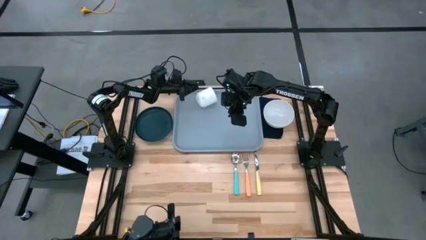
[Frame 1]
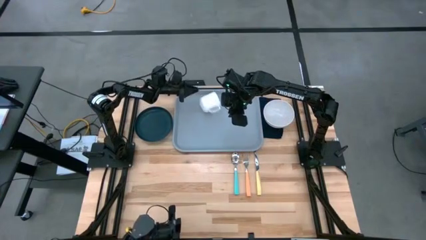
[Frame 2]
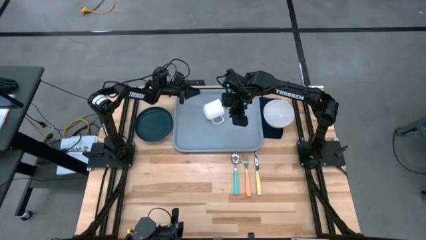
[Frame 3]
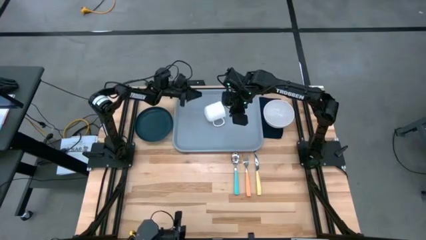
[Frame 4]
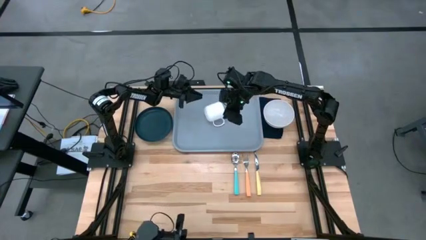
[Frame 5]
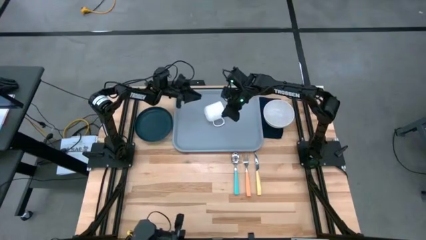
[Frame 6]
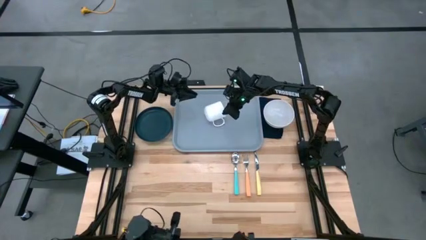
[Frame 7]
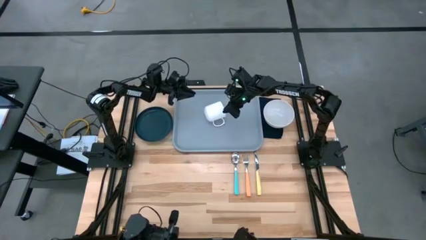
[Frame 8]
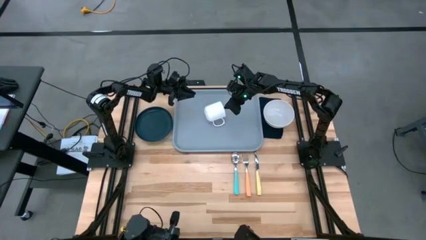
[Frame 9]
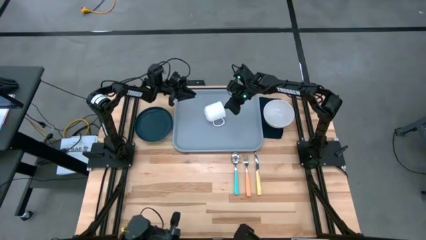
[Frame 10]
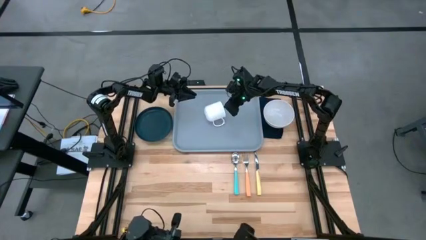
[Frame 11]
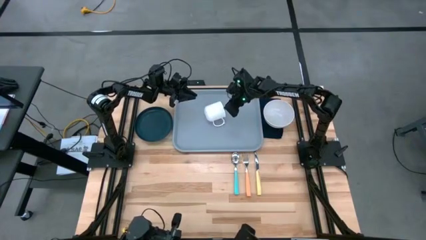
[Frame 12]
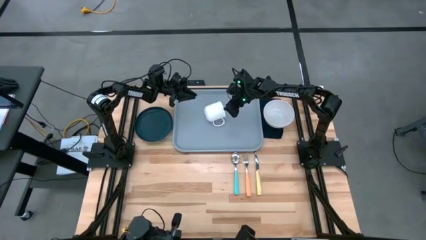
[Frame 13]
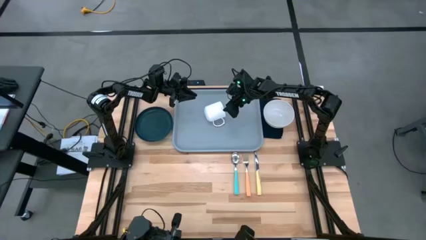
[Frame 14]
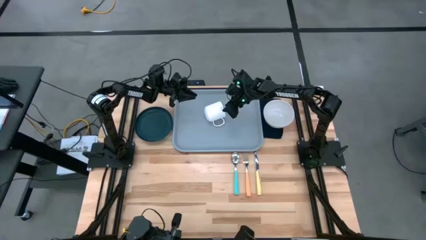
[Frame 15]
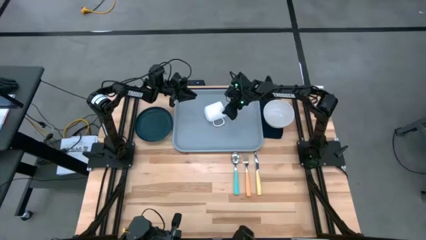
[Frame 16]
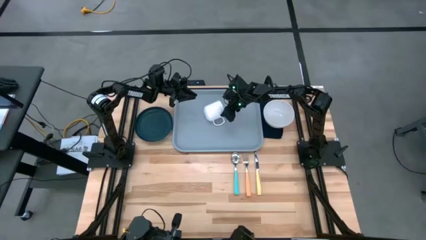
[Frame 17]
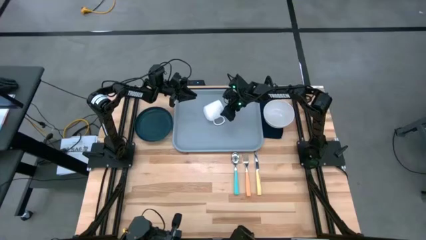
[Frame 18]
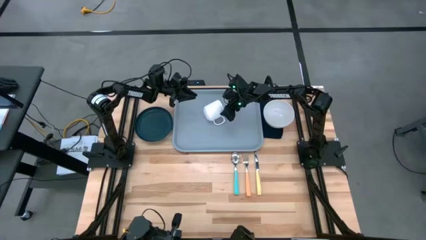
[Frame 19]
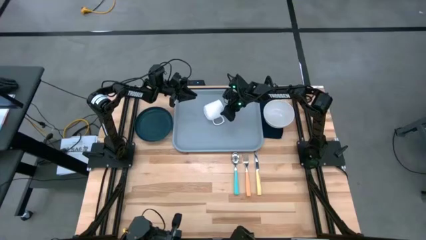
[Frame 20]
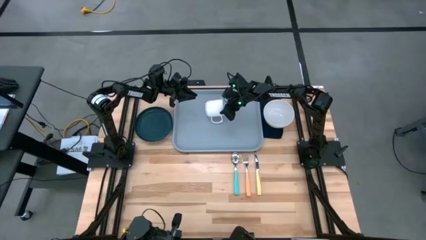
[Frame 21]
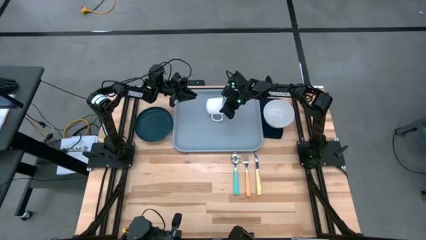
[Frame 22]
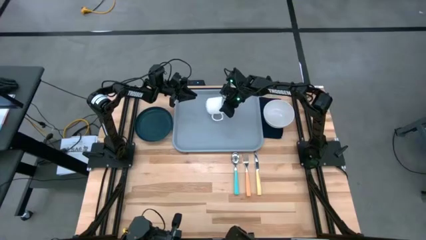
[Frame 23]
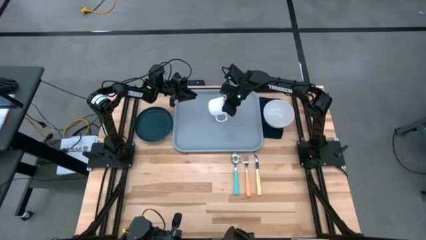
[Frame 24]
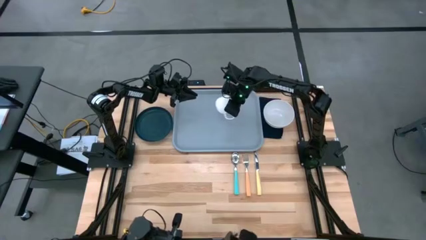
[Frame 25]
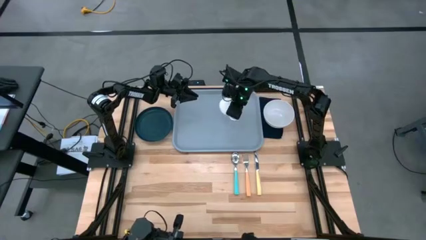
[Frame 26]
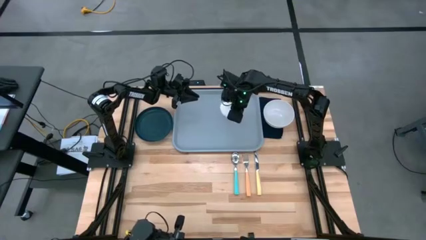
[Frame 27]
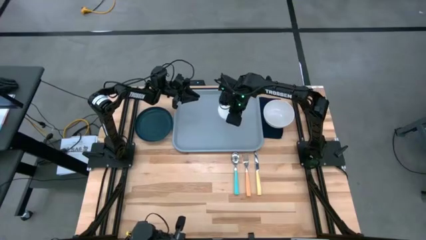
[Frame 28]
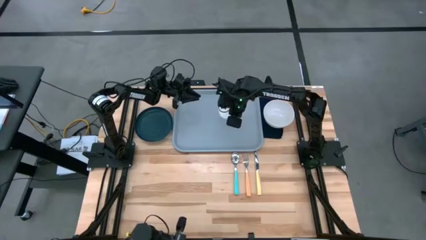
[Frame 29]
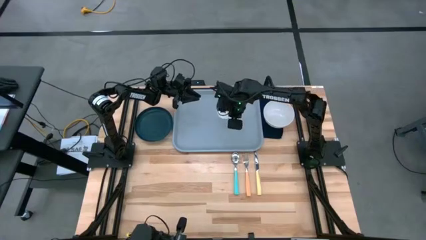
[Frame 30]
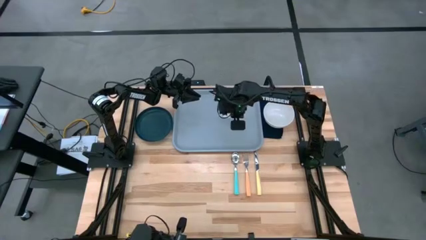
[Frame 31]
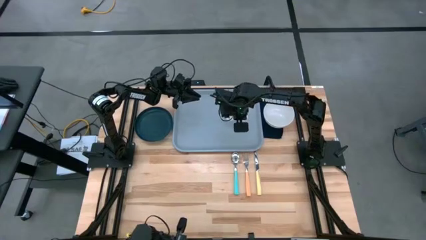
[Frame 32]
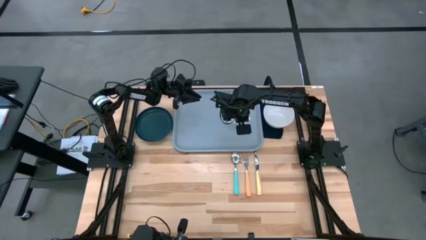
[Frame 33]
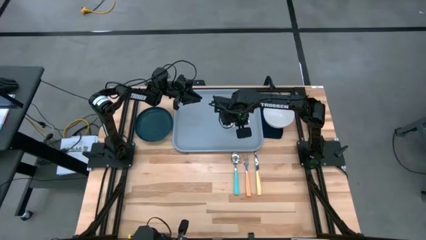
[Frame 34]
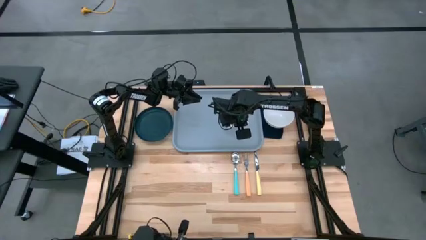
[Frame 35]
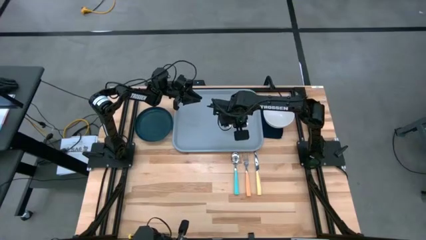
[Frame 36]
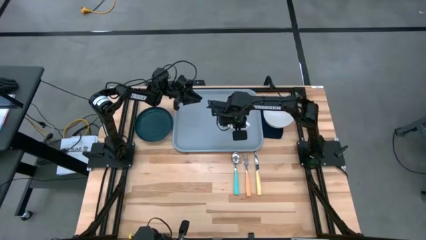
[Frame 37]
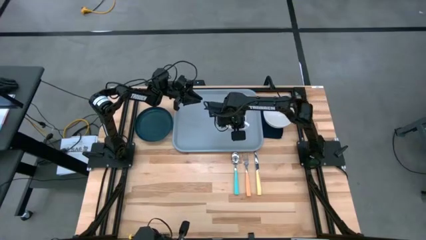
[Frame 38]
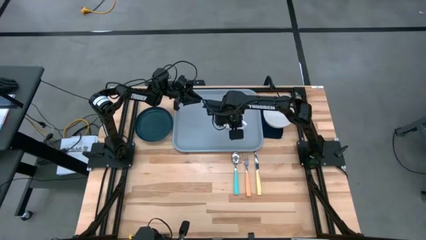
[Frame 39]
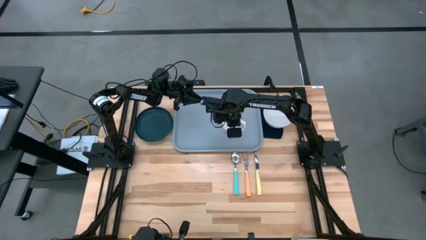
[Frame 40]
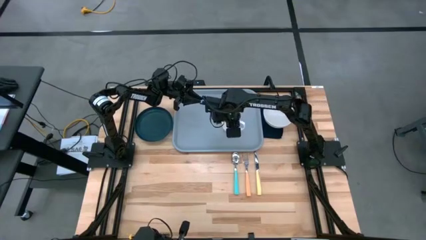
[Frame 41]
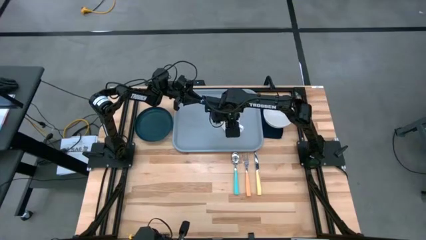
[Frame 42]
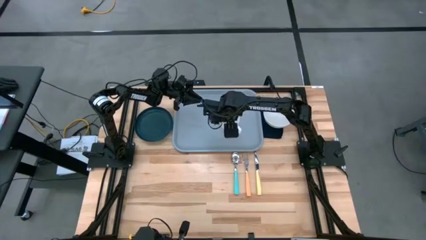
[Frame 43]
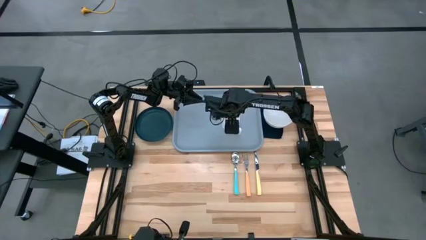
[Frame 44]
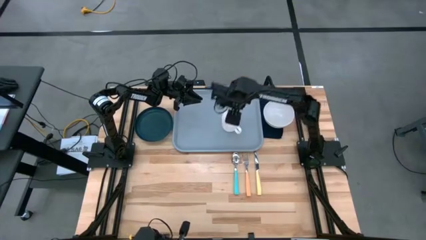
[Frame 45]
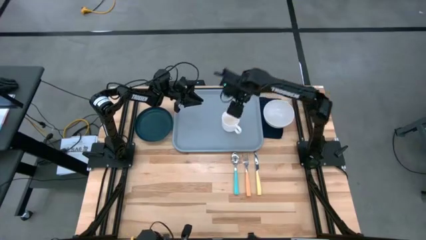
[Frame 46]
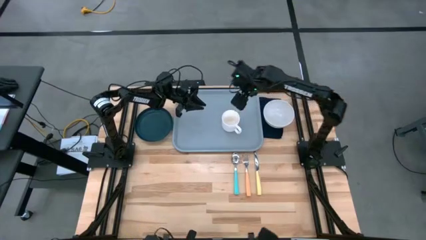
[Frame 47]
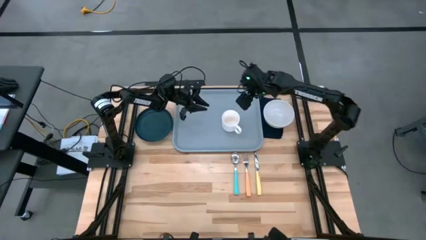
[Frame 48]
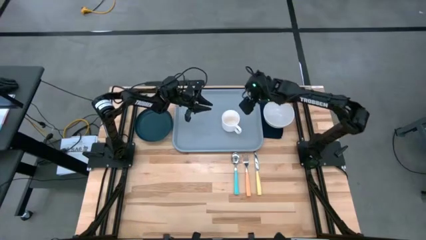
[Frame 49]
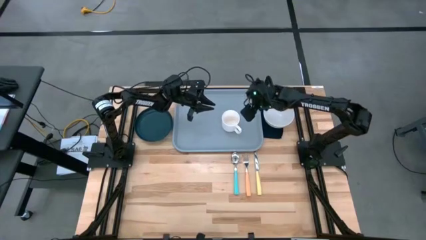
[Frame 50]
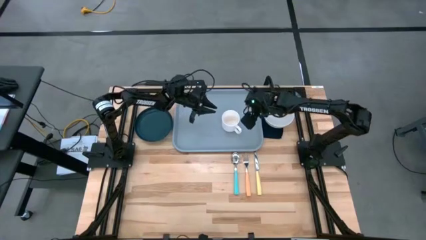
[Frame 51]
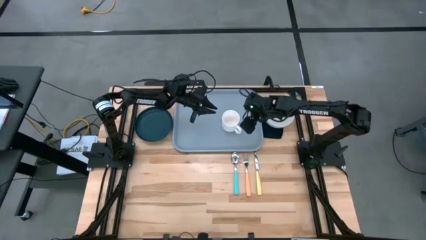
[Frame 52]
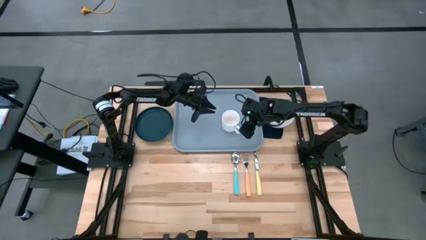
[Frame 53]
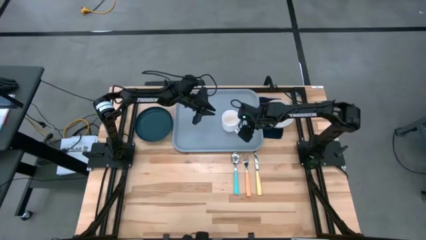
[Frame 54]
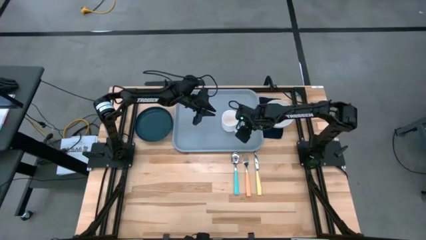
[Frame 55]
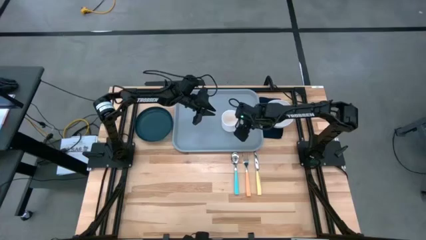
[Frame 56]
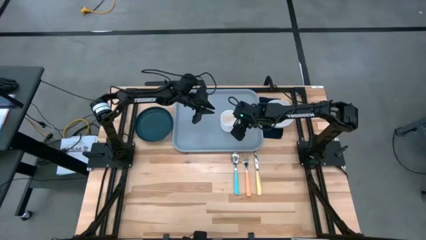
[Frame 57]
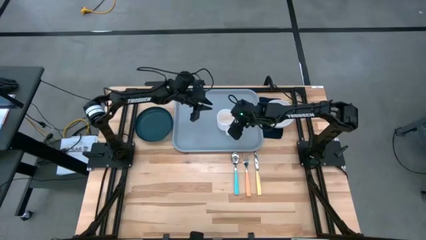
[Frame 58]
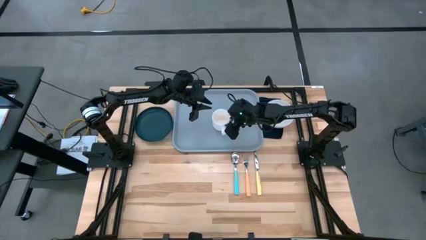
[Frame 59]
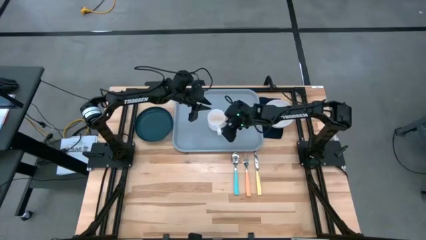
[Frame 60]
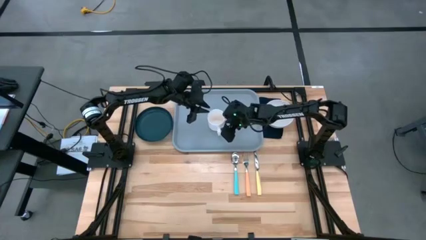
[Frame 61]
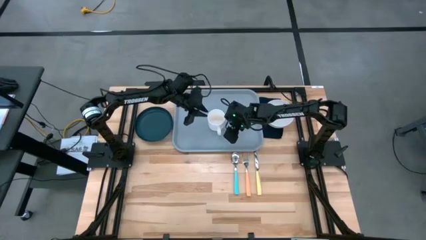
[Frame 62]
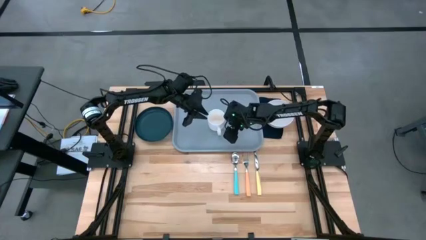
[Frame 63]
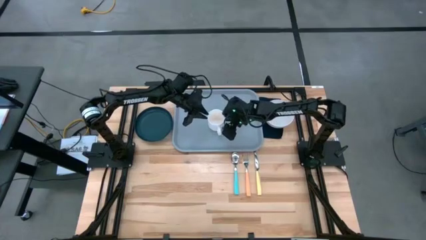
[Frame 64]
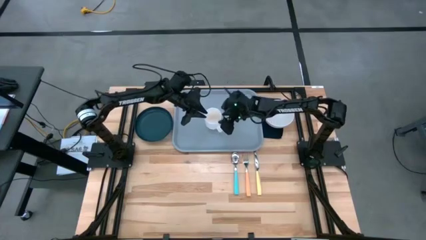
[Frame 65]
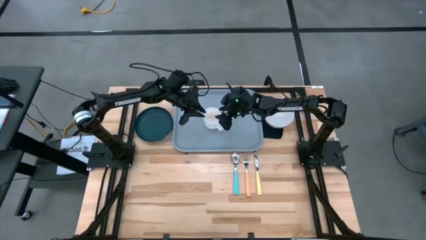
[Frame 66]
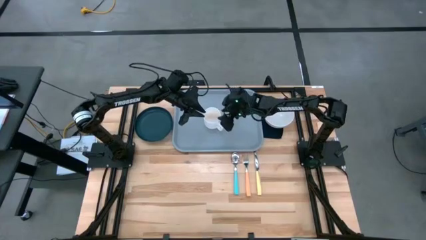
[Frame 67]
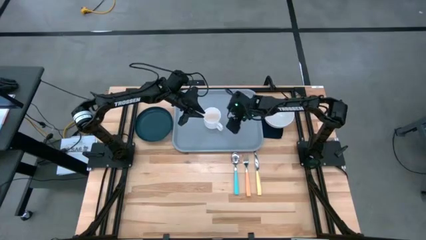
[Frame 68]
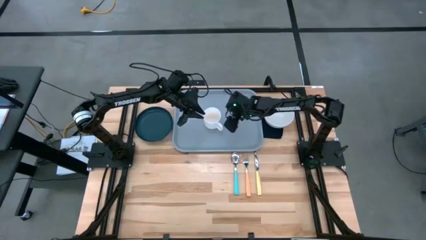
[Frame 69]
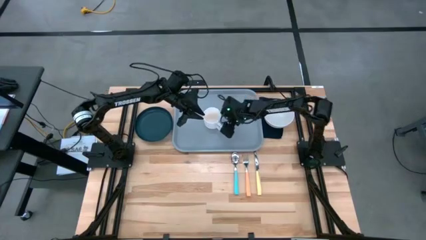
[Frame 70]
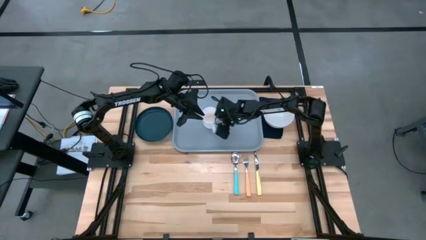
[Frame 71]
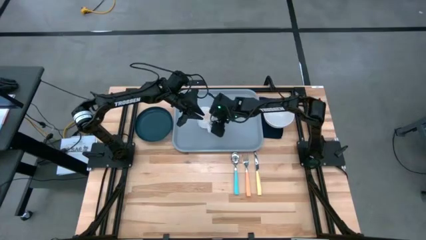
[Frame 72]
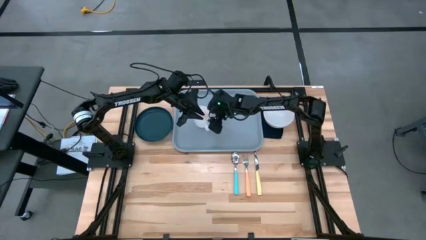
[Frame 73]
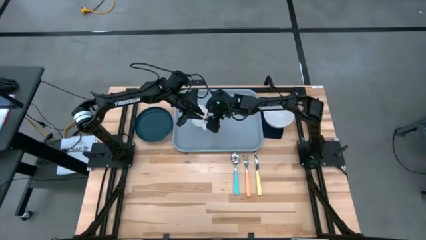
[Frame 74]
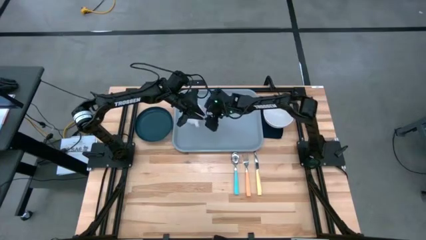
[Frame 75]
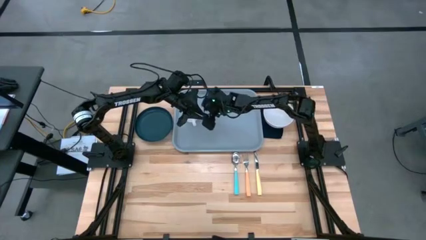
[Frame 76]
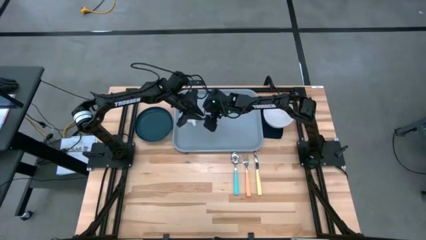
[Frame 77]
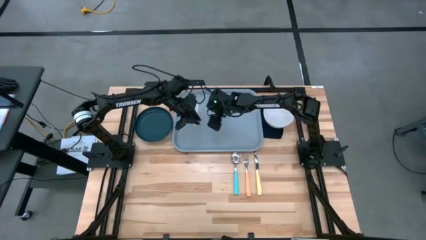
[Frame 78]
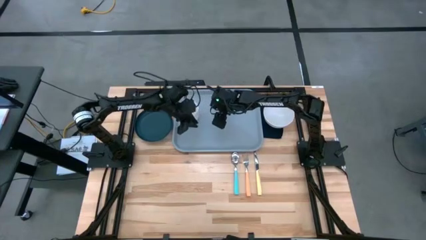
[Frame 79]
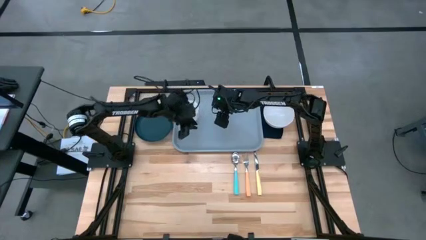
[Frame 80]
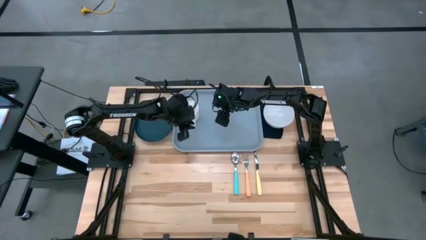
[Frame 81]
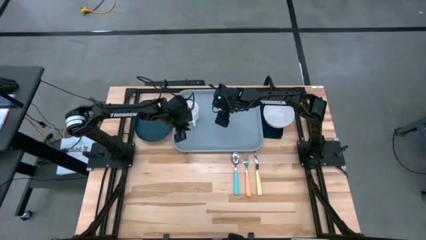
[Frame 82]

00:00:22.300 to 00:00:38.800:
Task: Set up tray
Put the white mug on the gray tray
